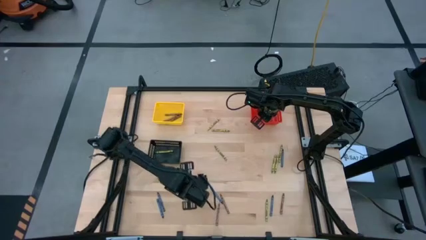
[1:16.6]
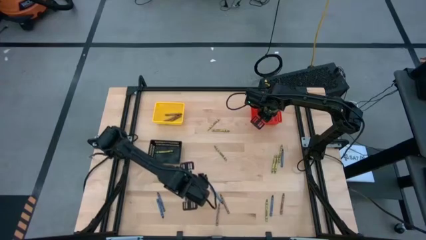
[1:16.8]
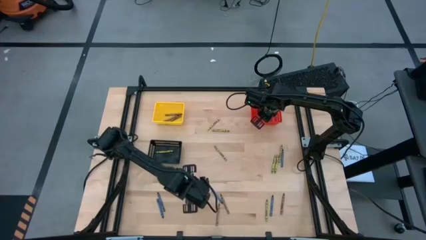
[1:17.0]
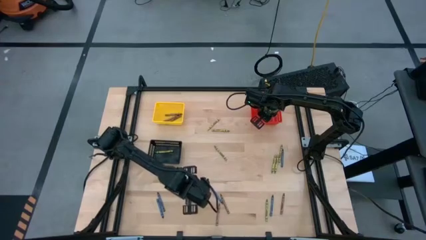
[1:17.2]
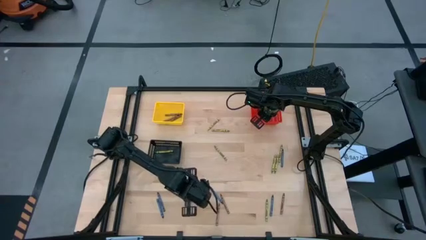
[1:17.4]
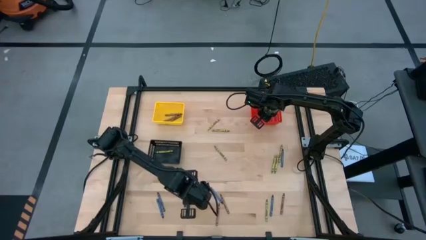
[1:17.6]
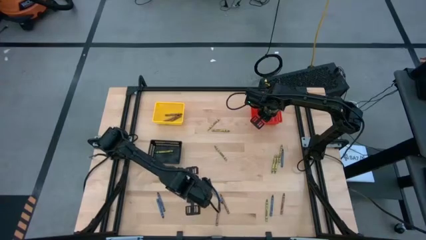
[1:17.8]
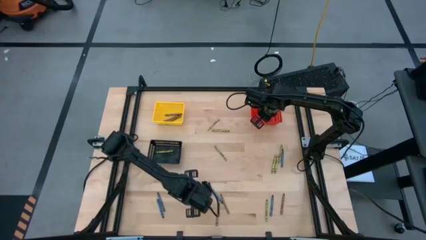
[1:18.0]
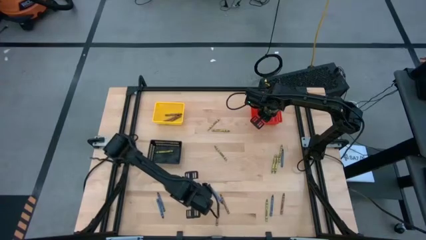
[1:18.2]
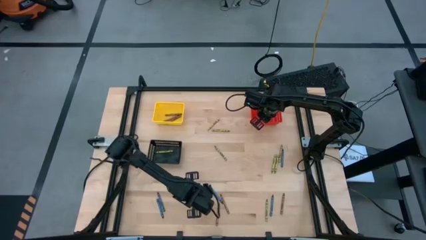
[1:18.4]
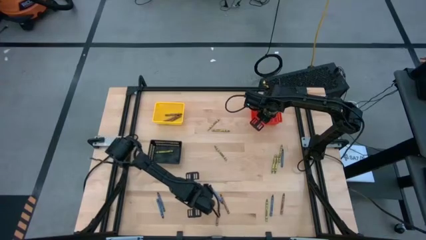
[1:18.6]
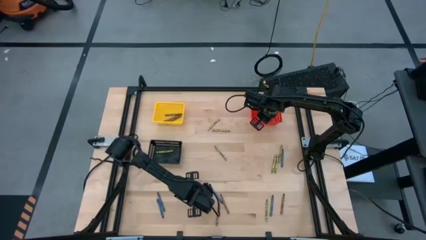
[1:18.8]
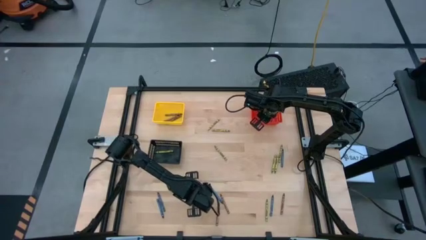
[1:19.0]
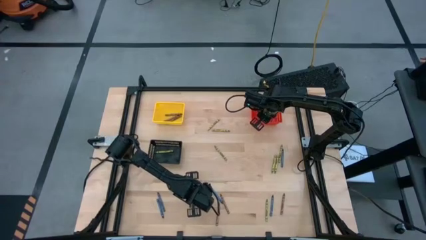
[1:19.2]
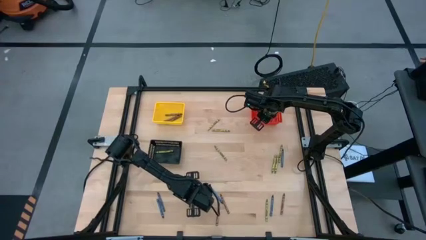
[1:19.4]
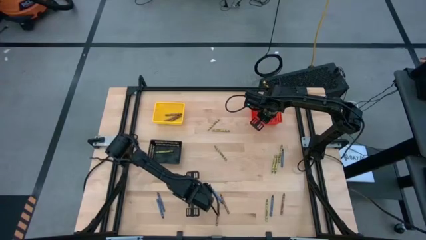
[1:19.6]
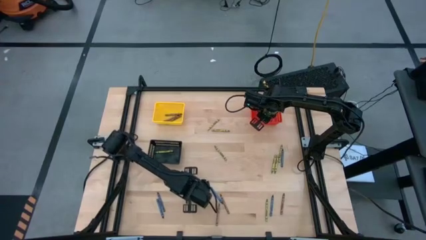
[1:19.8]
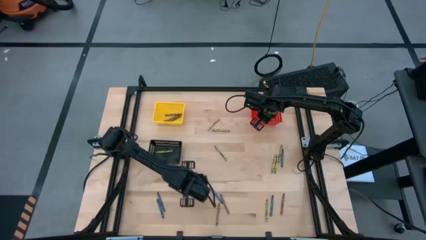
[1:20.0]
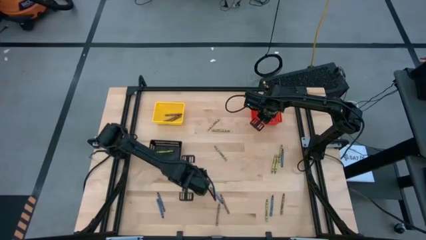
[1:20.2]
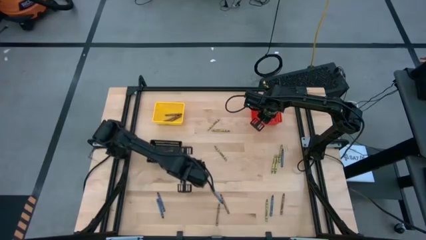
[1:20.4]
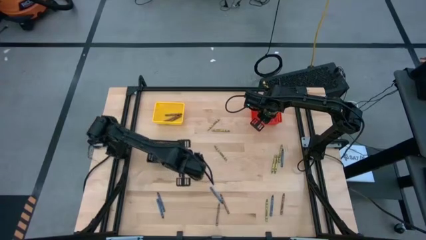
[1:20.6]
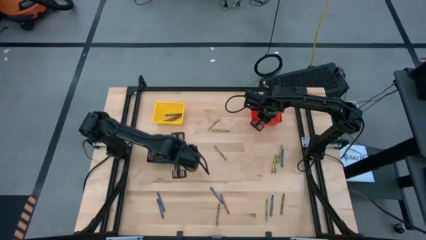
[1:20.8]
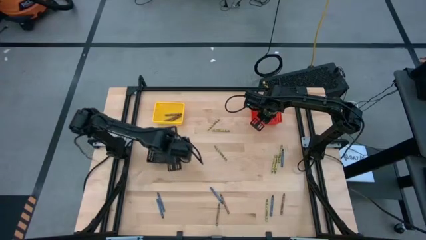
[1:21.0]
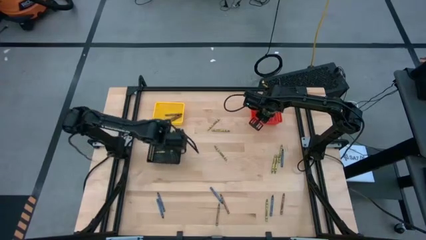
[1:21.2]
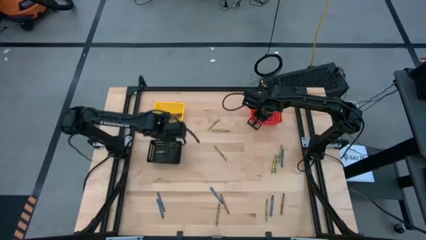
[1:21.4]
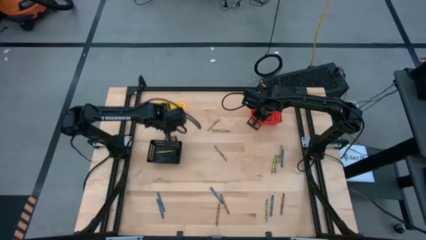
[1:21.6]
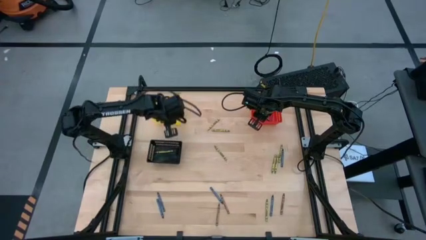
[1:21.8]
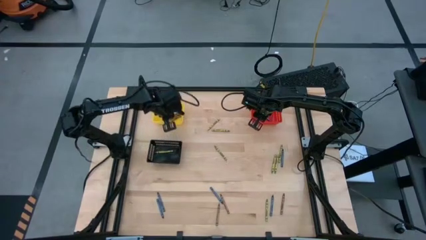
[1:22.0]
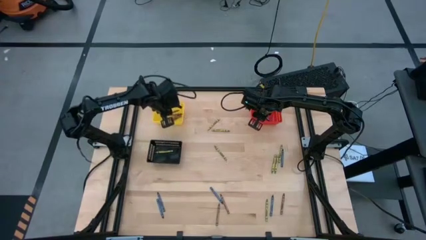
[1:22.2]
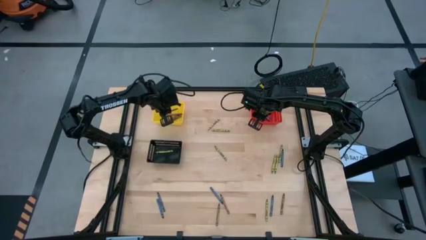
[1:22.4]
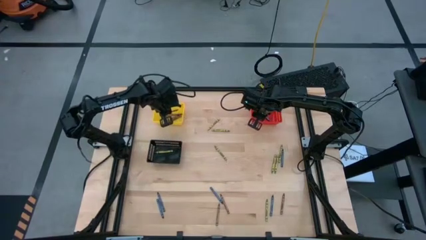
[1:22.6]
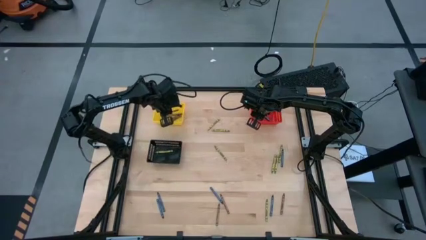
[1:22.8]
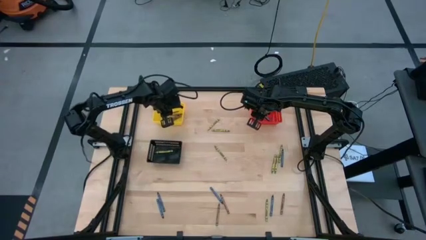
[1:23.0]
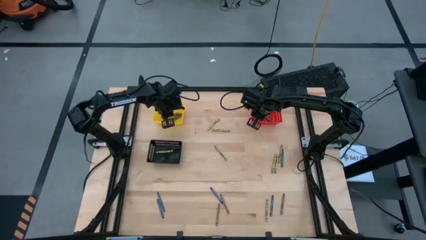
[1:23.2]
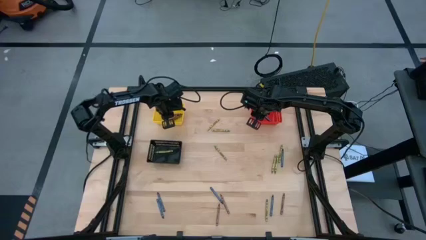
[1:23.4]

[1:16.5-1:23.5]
Task: Sort crayons
Put the brown crayon into the yellow bin

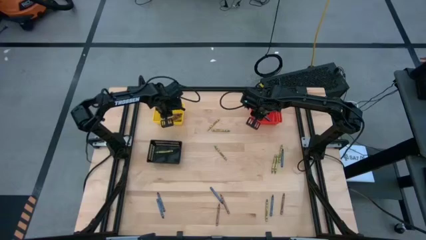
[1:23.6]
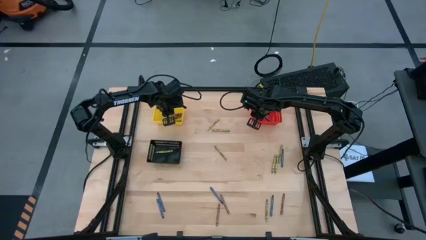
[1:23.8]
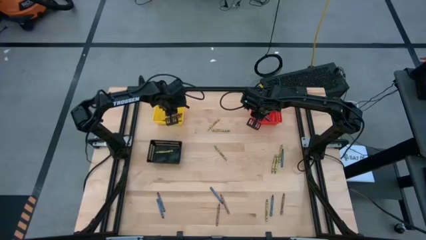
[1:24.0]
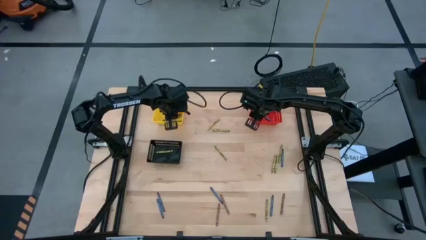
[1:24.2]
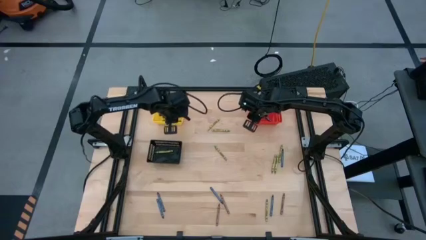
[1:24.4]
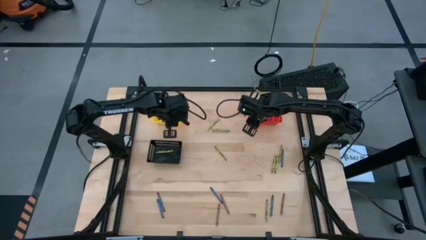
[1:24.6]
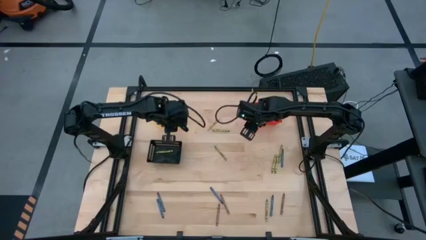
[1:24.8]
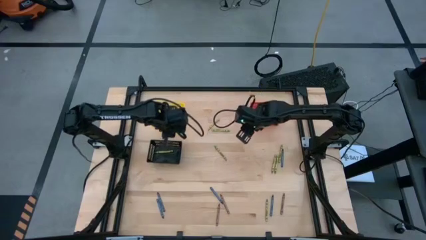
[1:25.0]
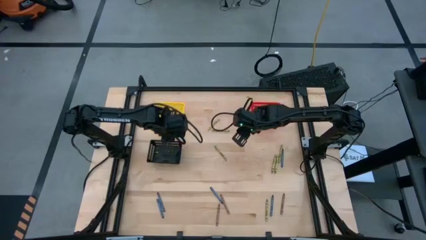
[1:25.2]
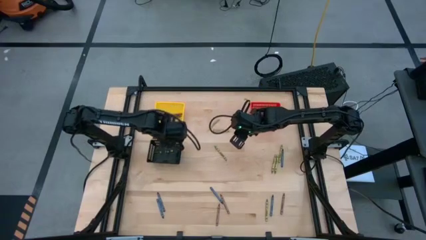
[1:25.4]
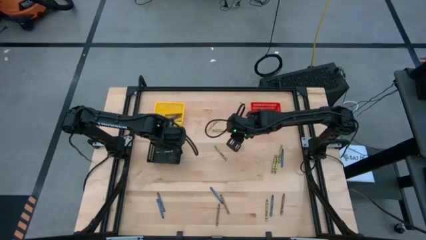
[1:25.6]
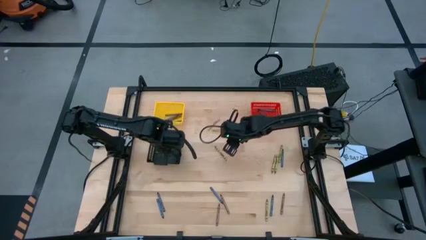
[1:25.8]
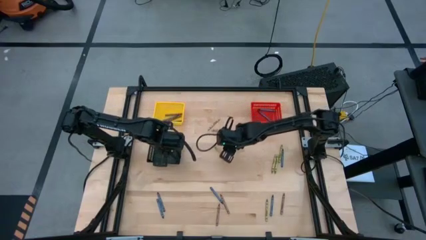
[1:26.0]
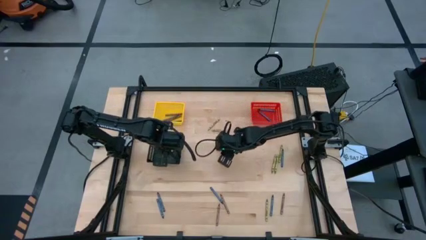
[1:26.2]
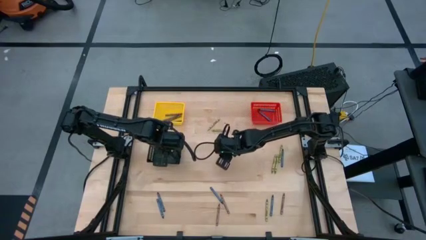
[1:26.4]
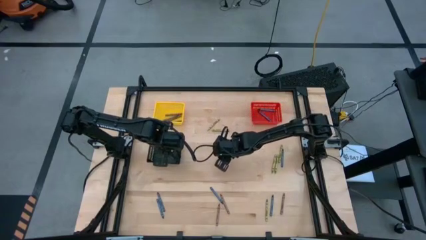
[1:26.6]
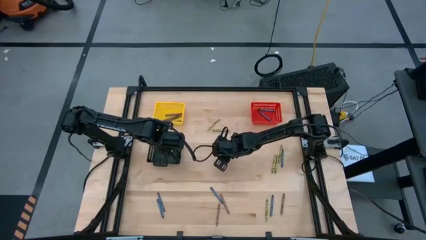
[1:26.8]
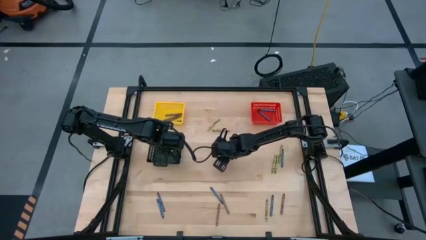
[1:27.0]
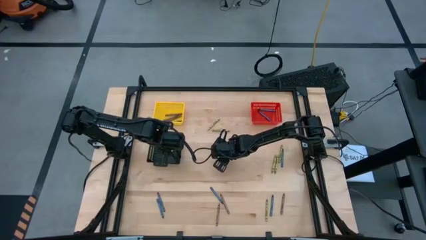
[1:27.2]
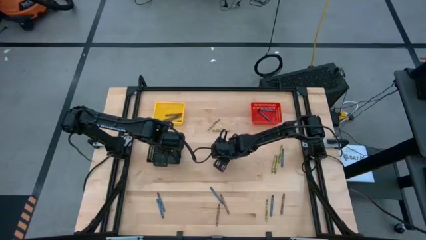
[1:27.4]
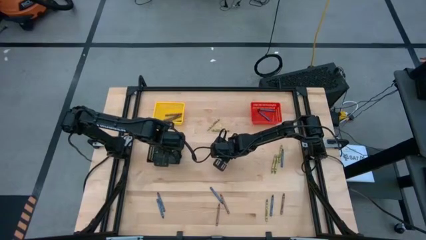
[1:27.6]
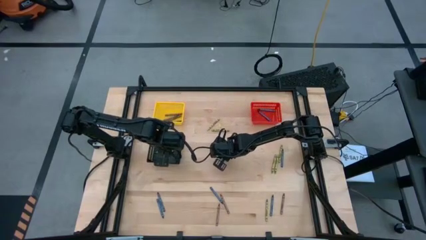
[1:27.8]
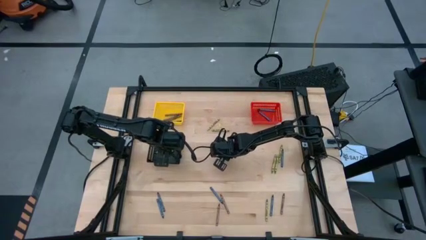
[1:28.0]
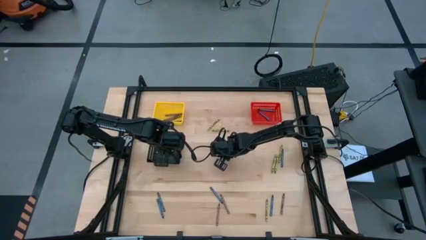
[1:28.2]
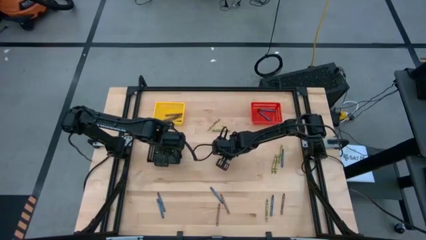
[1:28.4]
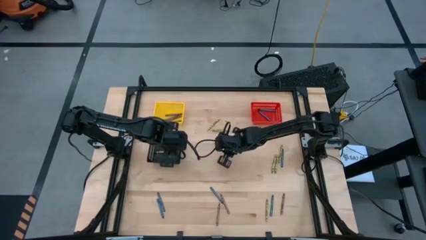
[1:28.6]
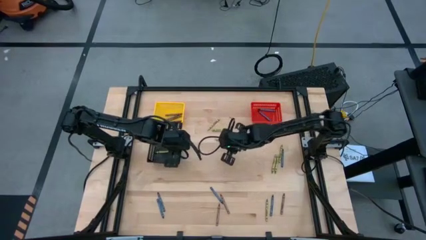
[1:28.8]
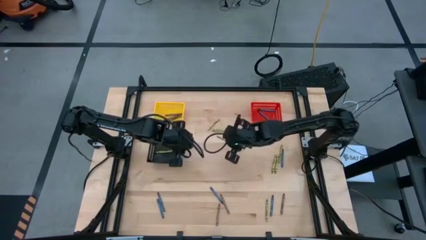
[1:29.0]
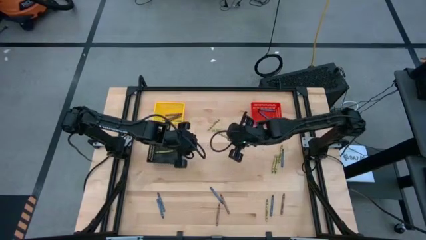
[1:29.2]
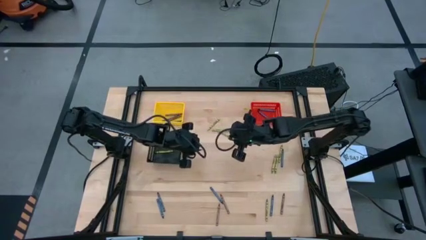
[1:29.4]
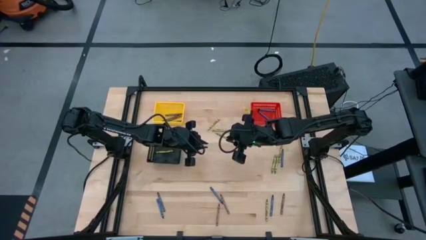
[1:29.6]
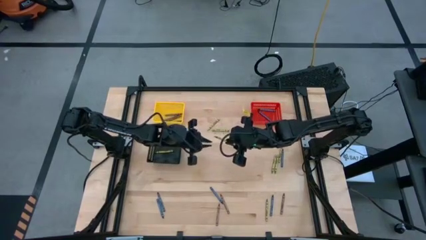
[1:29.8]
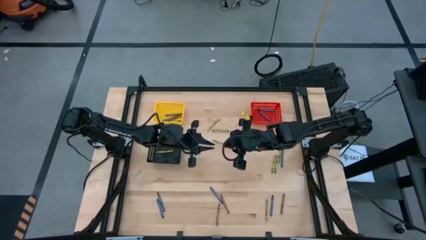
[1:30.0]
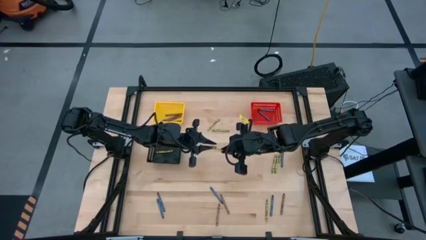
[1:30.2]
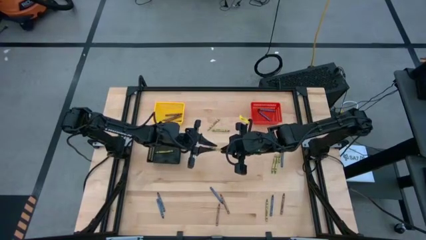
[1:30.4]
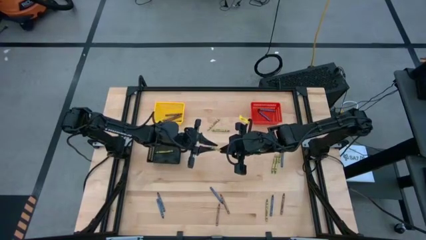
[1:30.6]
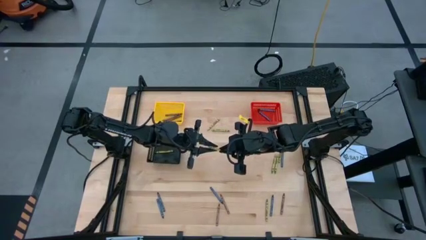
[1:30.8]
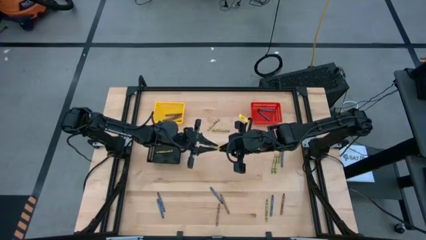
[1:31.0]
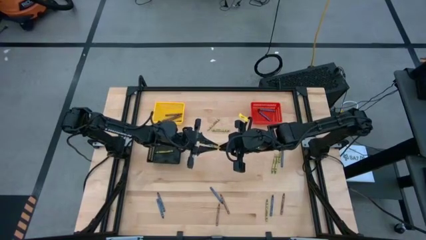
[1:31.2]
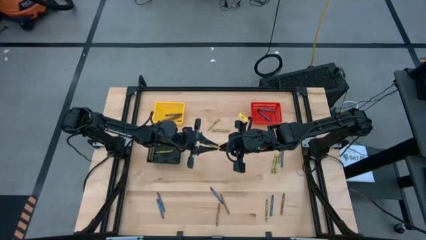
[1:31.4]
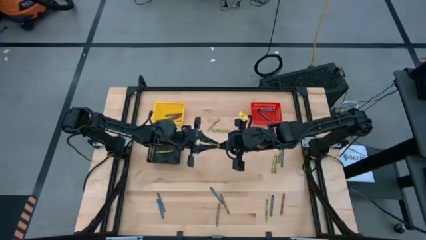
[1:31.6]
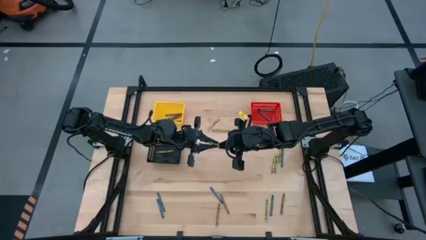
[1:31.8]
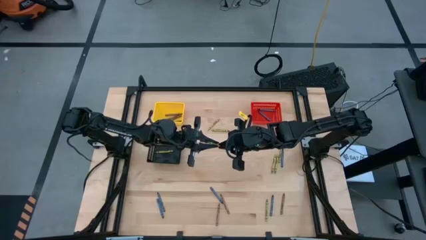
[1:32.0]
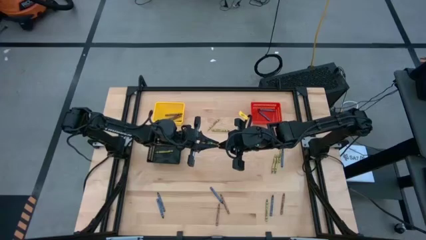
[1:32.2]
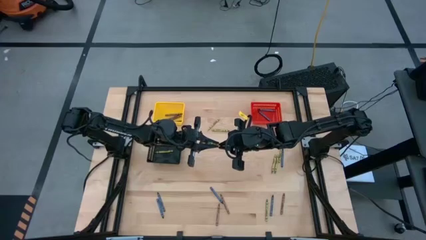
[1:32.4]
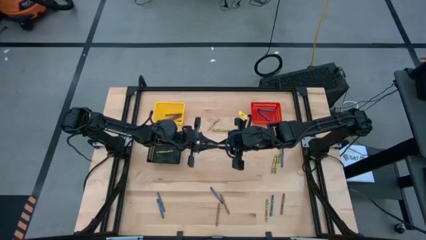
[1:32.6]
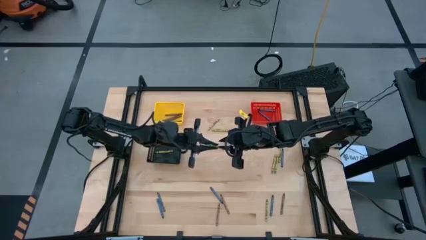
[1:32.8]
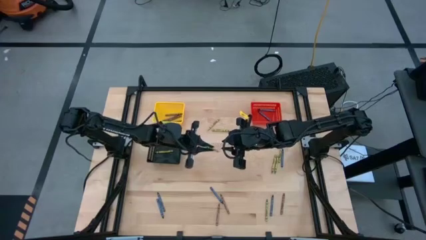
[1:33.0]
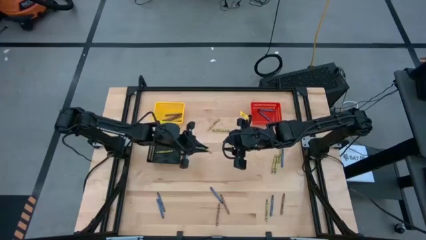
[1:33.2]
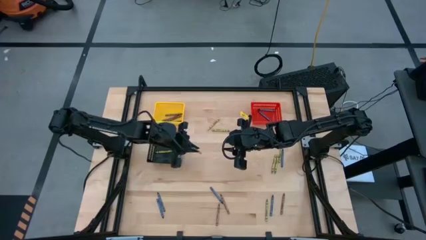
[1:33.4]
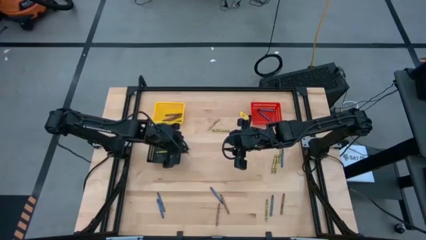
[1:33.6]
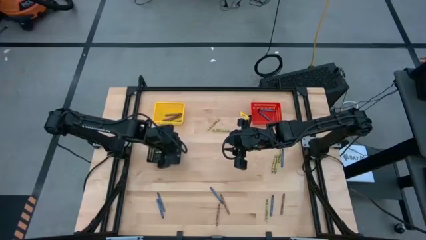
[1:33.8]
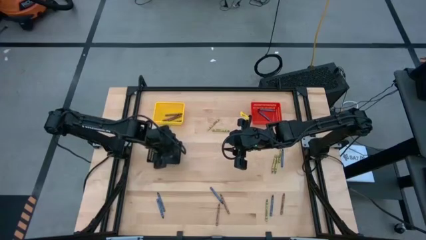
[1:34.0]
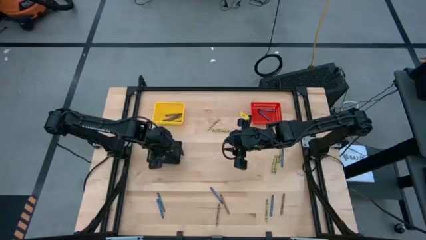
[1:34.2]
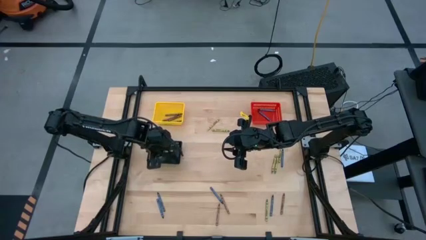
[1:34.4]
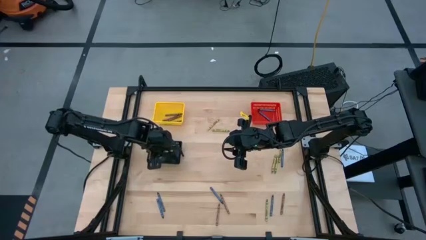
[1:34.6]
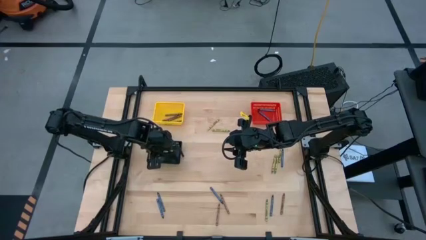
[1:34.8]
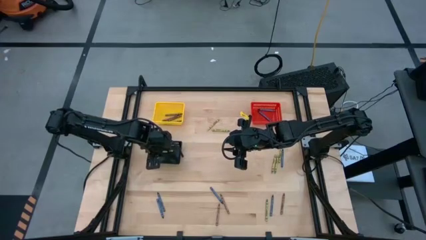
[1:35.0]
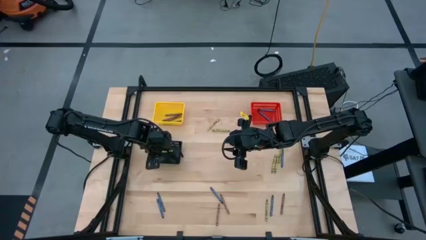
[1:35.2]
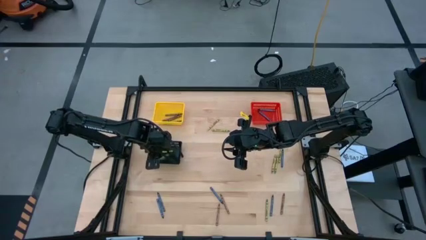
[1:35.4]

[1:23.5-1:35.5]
Put the green crayon into the black bin
